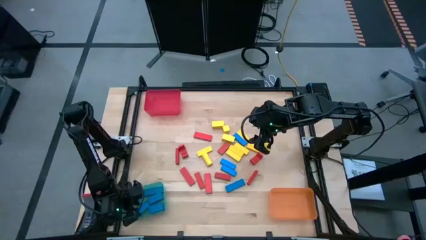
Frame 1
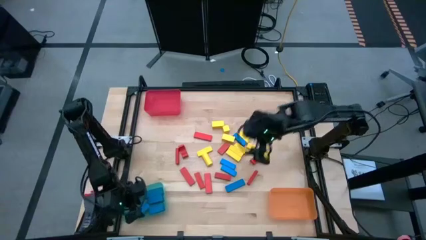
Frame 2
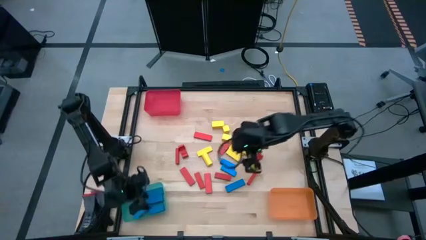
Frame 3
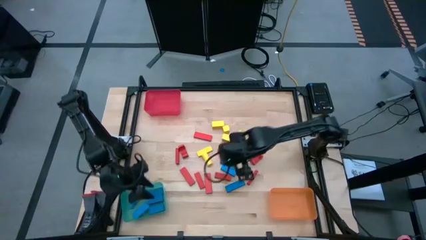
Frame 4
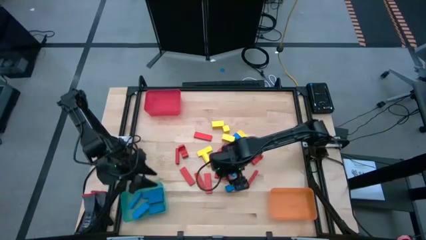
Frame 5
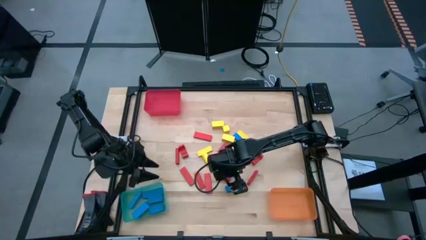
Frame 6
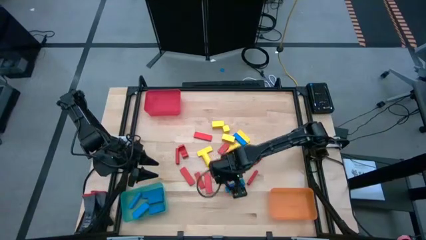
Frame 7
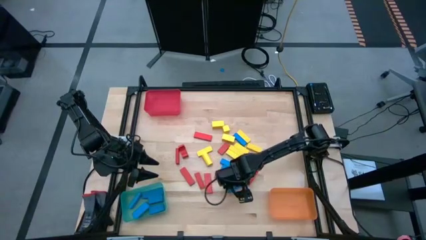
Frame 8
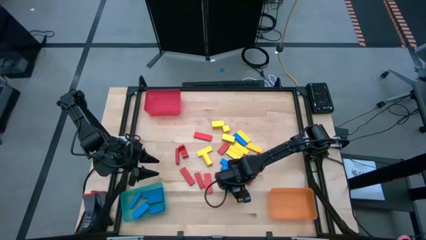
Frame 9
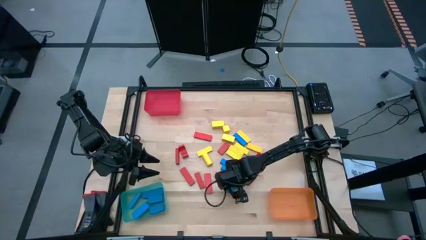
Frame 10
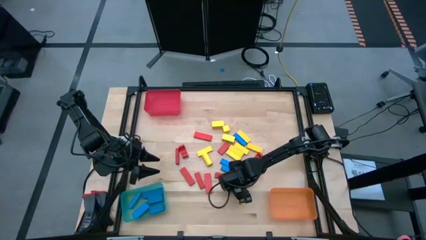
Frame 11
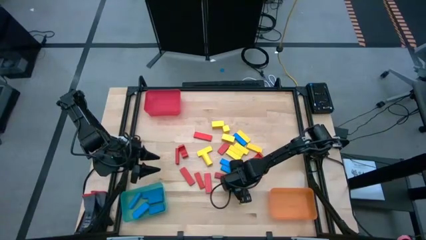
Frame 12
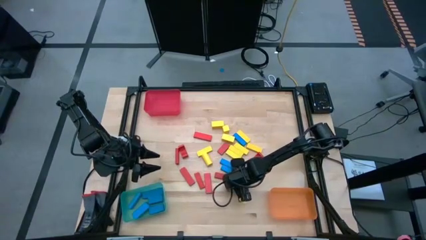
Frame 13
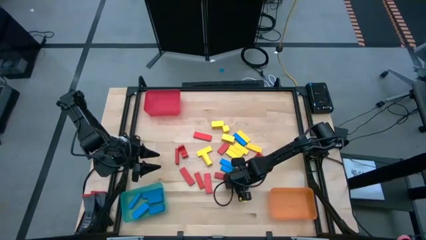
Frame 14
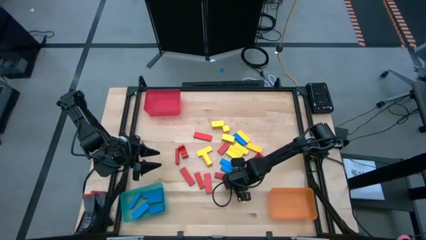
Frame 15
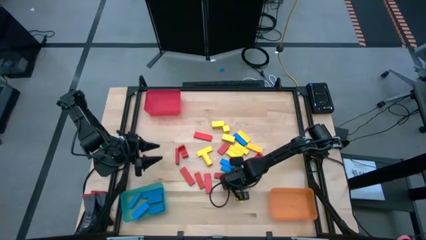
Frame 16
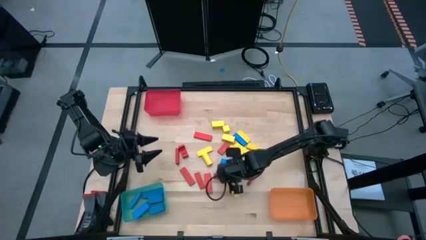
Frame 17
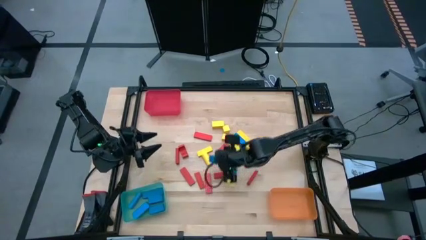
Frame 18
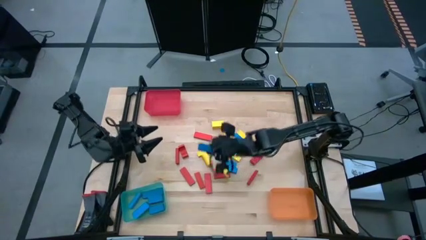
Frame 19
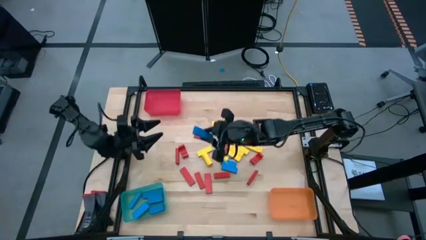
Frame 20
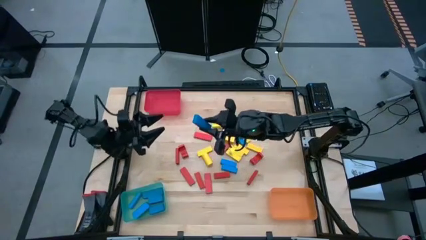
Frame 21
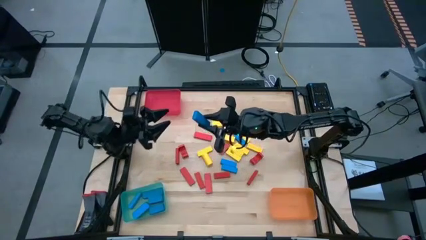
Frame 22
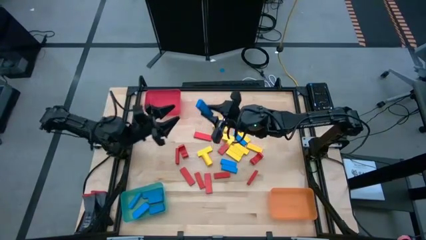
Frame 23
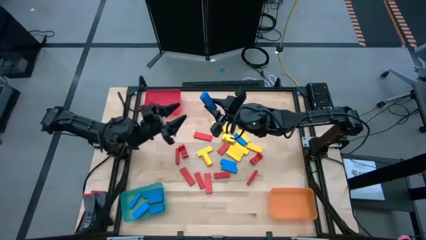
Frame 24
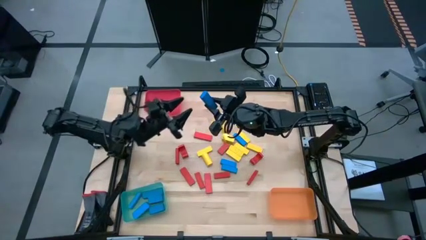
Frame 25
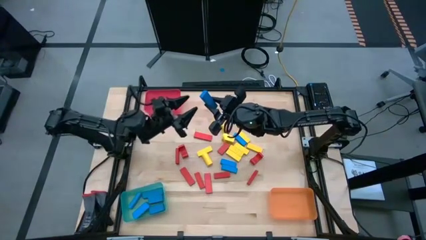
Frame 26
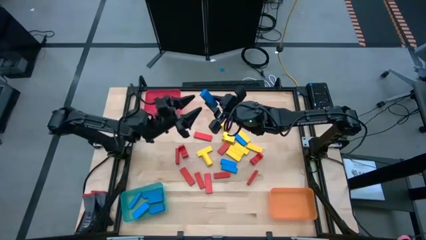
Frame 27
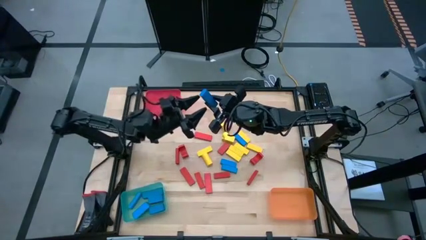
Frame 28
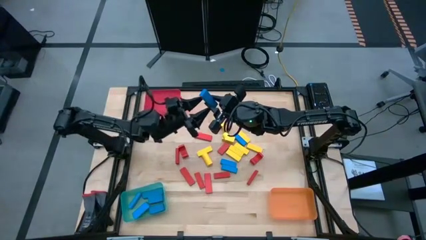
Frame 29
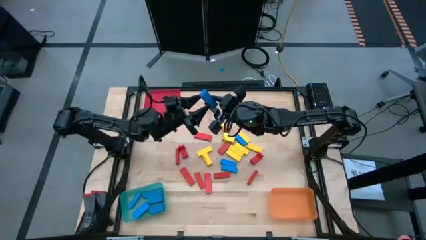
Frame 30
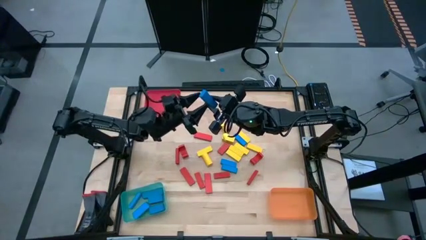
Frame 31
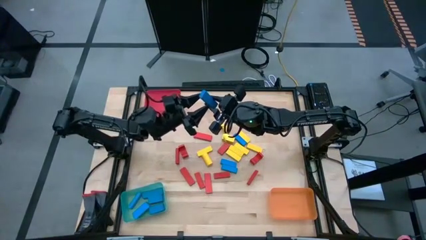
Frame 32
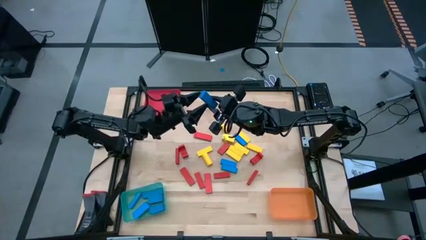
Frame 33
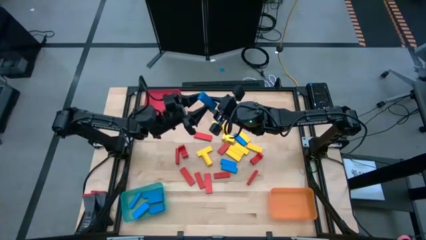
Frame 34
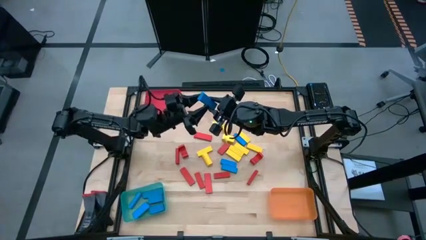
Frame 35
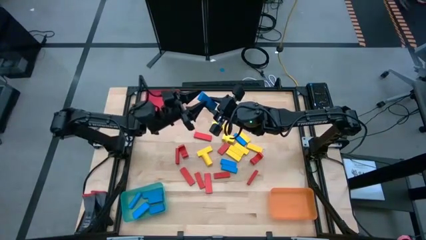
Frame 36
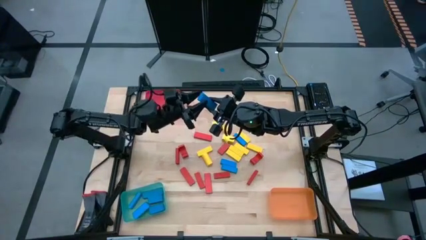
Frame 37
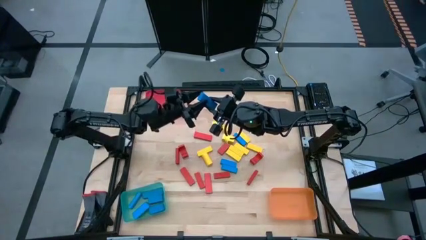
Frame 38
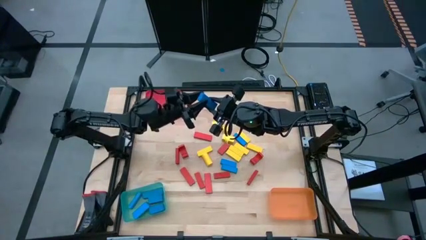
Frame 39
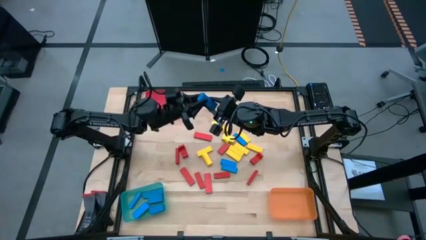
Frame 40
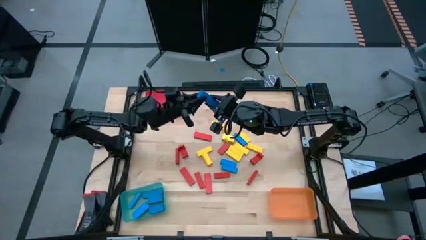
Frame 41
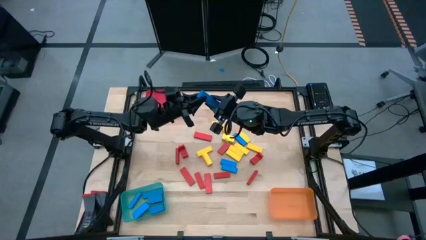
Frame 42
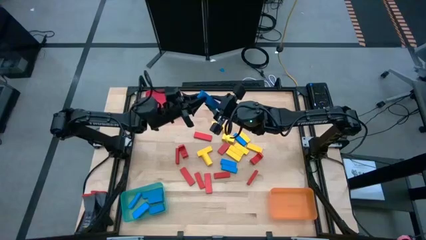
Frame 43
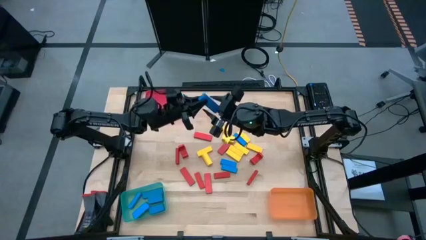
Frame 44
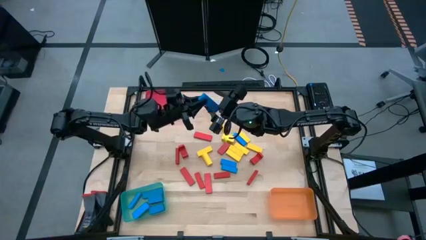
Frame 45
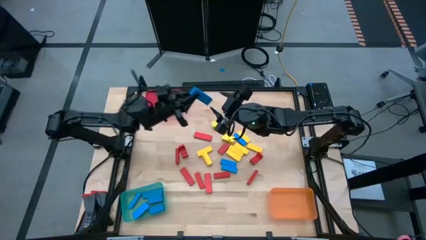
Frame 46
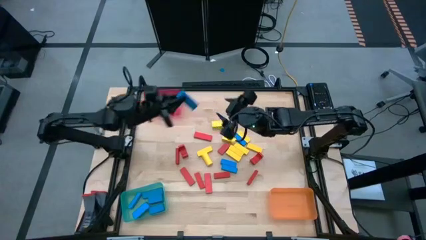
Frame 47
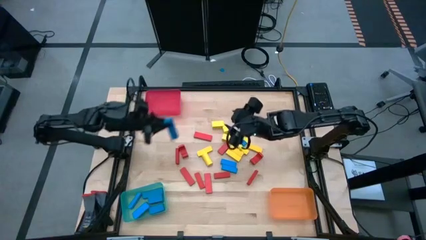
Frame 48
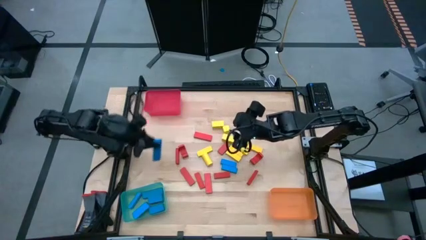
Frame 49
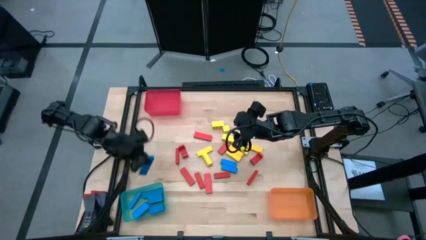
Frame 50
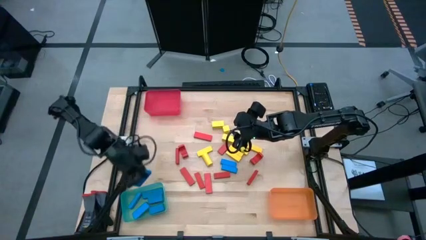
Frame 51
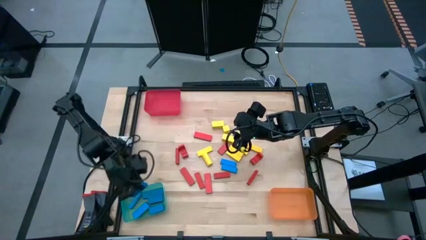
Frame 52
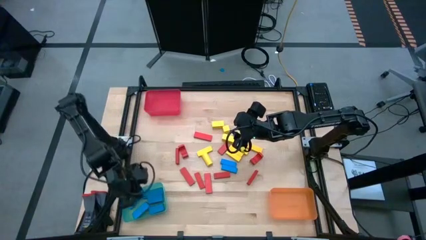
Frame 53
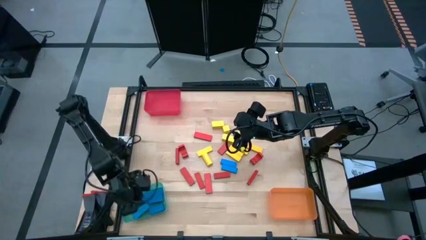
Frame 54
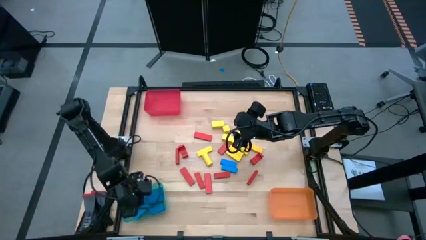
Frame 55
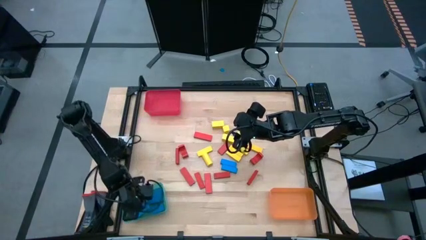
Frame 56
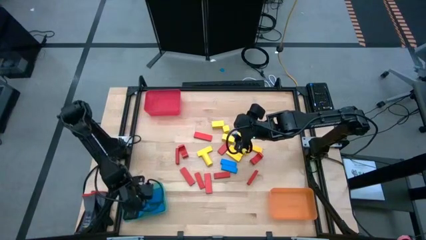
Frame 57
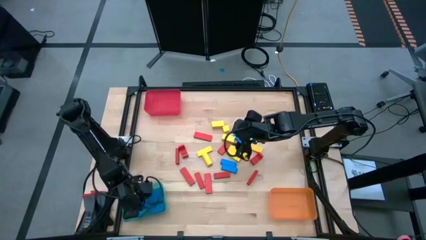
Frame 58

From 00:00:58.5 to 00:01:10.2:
Task: Sort blocks
Put the blue block into the green bin

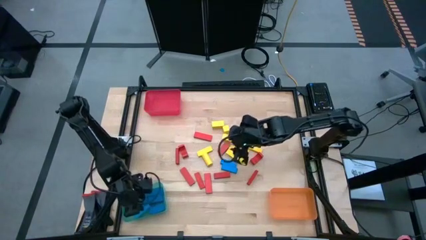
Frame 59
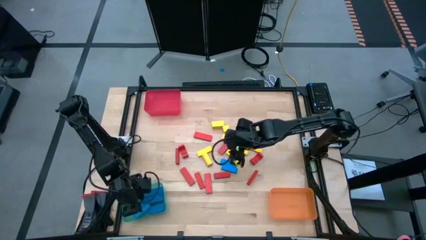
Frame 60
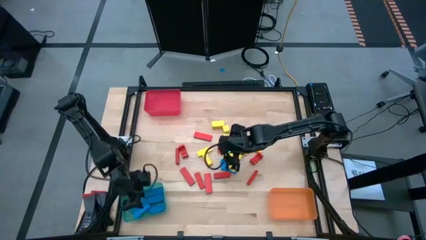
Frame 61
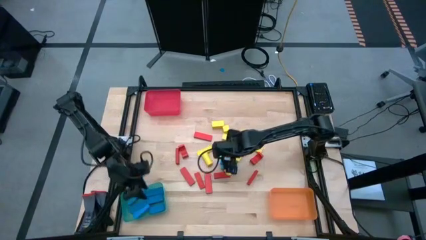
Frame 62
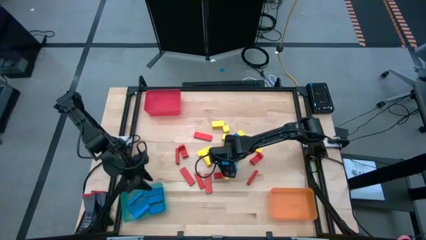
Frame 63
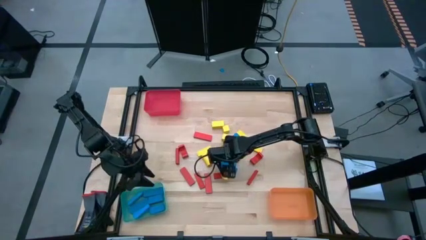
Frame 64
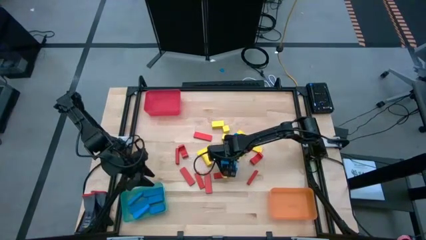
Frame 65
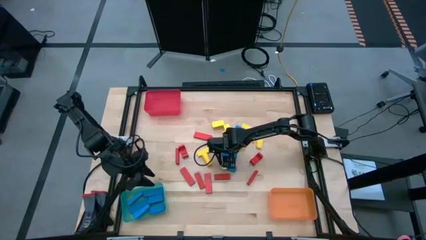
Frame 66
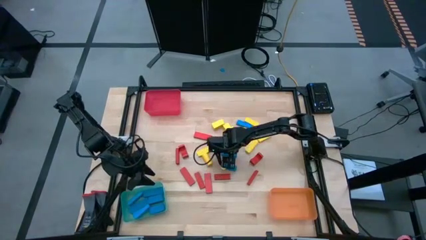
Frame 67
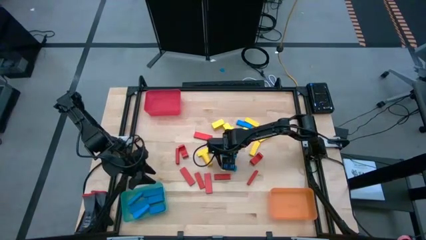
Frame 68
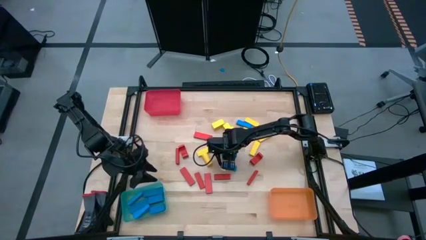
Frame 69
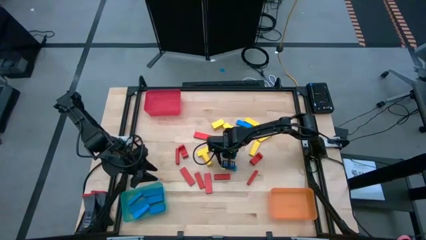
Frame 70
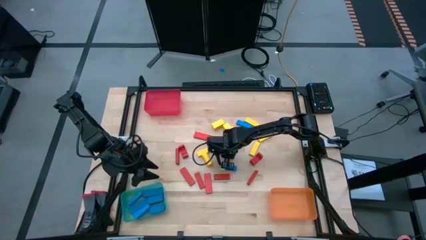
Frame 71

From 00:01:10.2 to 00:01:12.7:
Put the blue block into the green bin

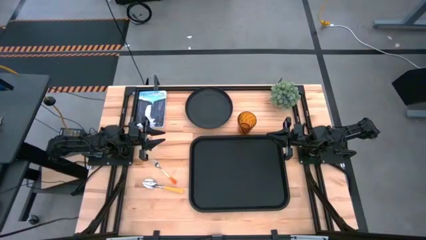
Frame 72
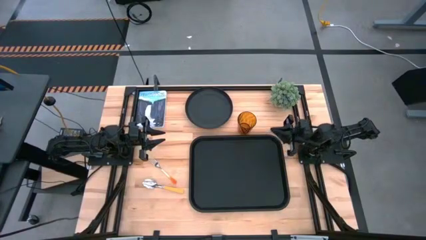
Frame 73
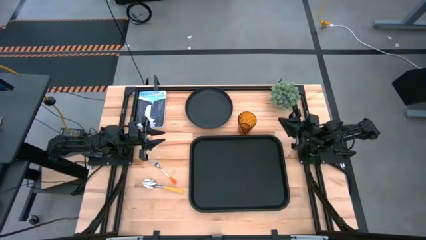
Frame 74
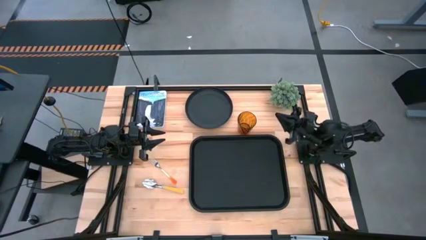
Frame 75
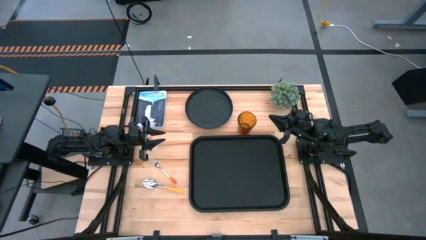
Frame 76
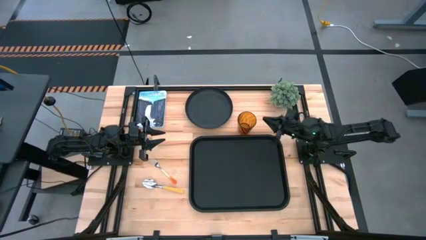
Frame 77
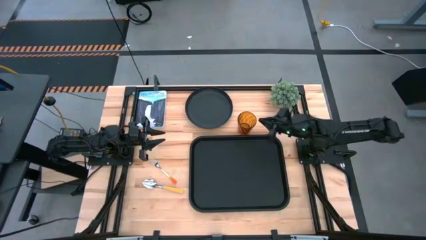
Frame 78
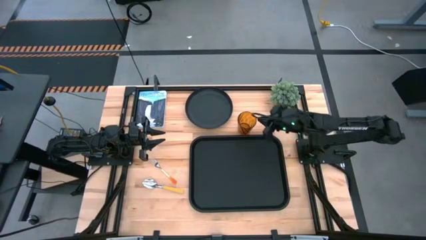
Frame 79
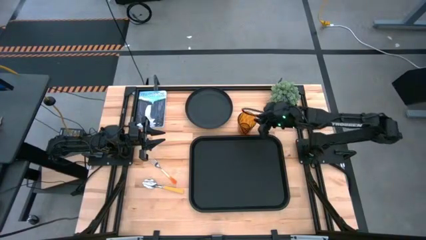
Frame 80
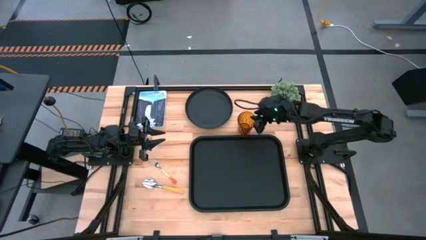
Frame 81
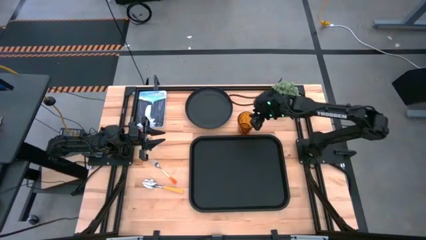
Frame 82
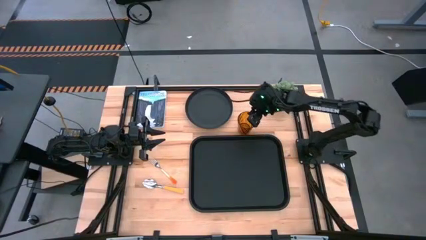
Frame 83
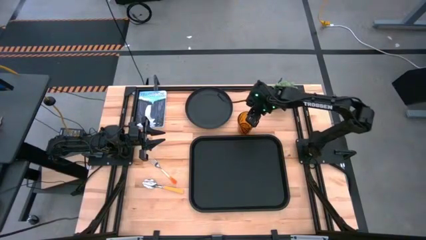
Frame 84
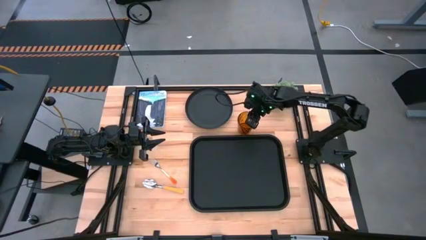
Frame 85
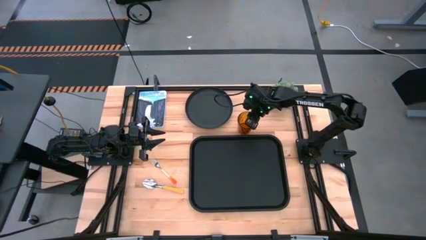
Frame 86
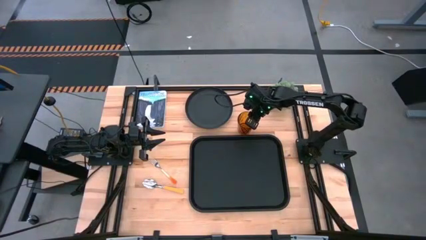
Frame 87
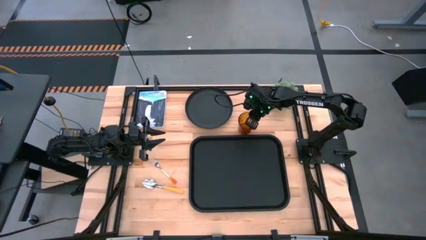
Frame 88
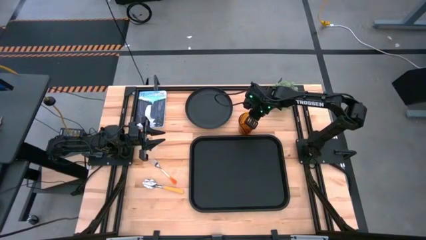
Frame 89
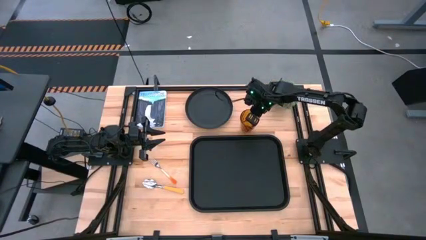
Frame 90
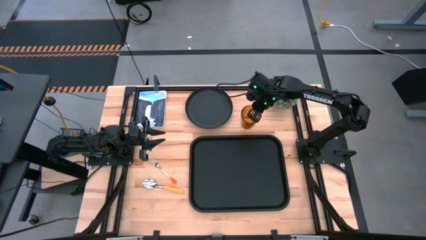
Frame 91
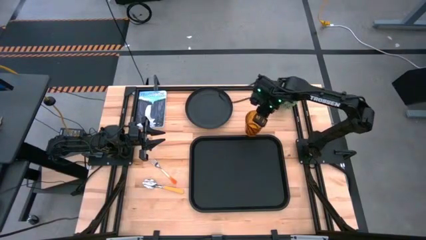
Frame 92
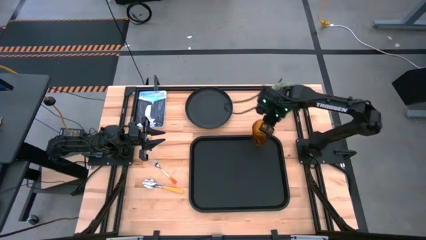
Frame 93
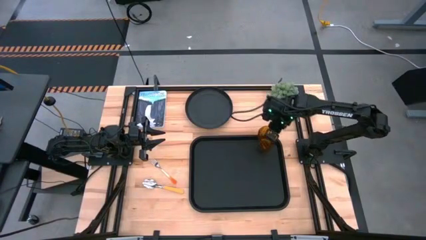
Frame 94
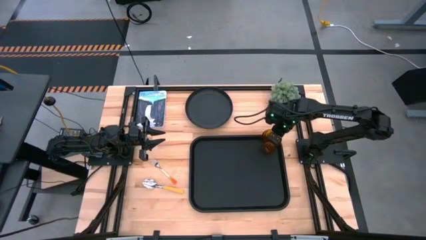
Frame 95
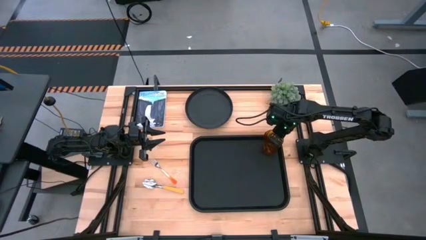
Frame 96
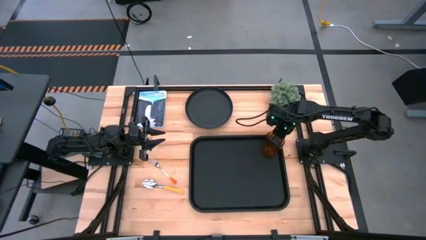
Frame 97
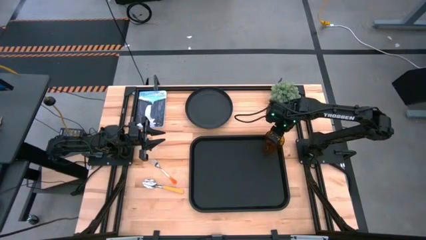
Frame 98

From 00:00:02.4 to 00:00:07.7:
Task: Pick and place plate/cup/fork/spoon on tray
Put the brown cup on the top right of the black tray
